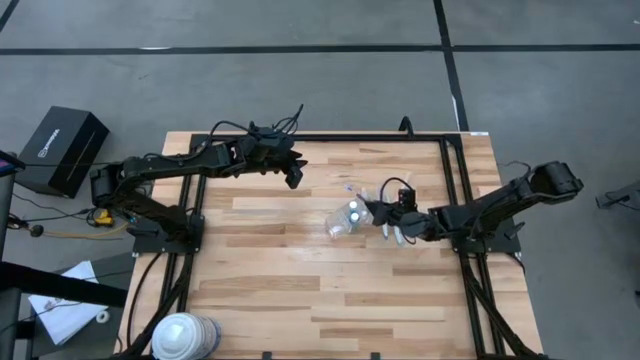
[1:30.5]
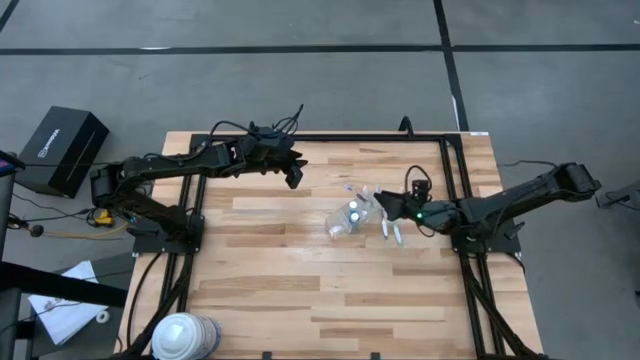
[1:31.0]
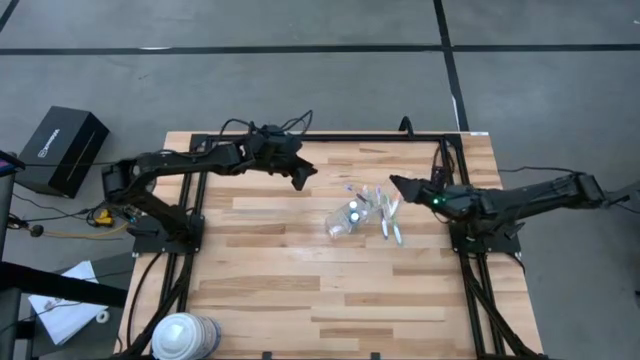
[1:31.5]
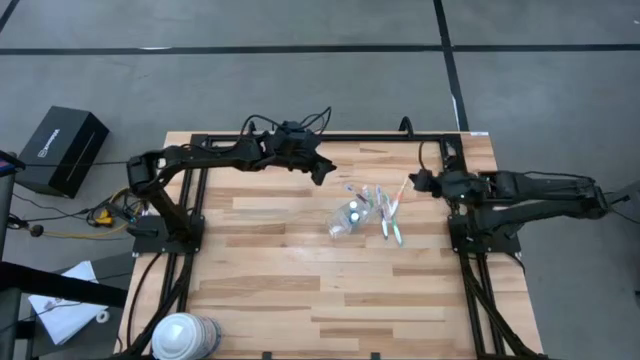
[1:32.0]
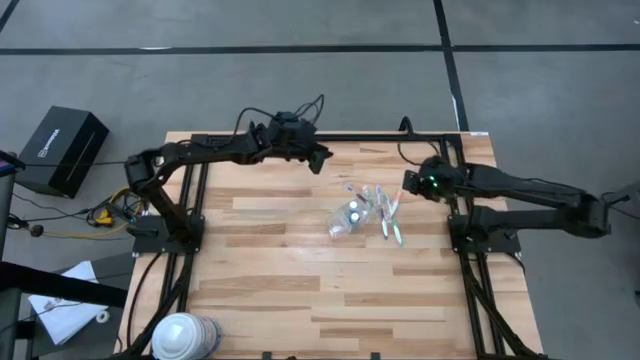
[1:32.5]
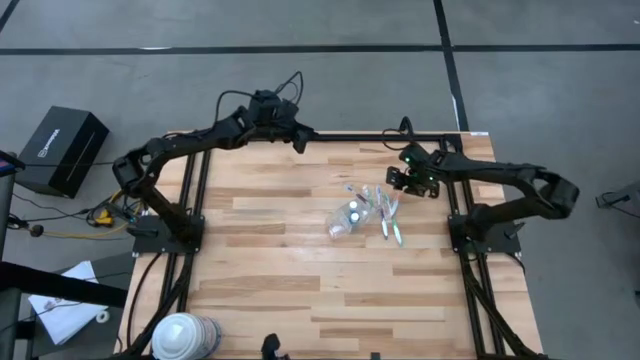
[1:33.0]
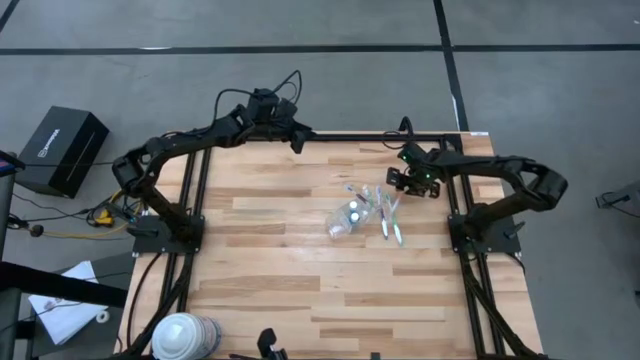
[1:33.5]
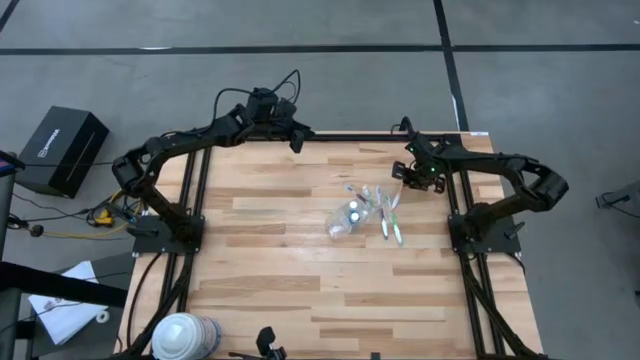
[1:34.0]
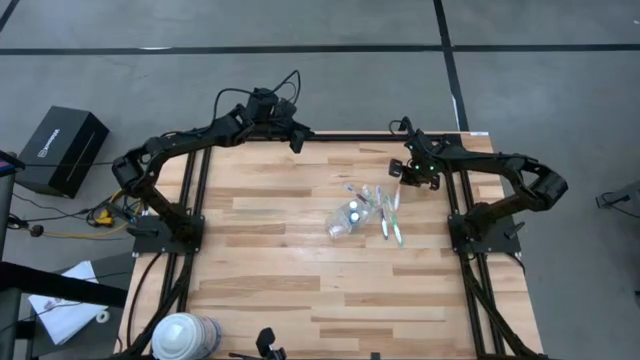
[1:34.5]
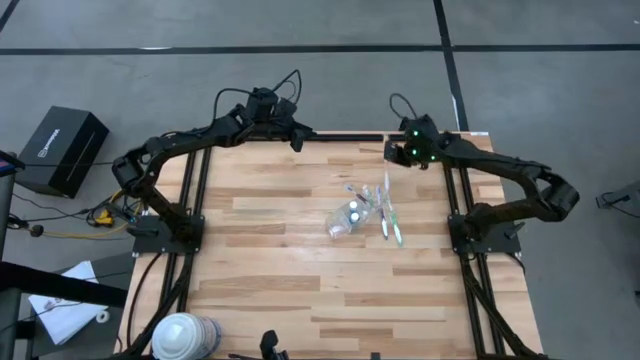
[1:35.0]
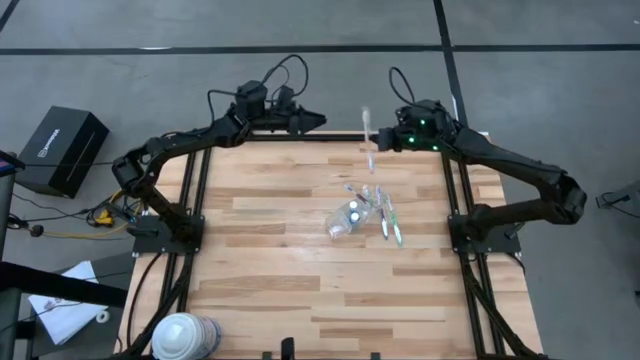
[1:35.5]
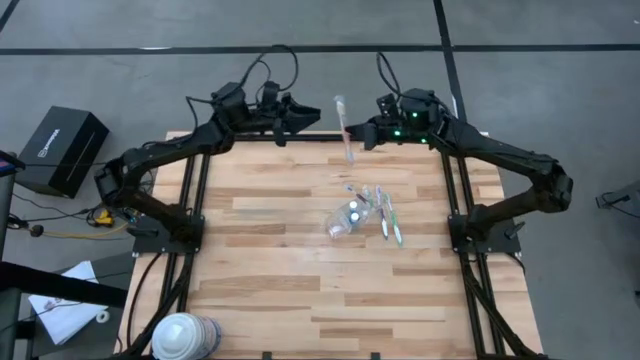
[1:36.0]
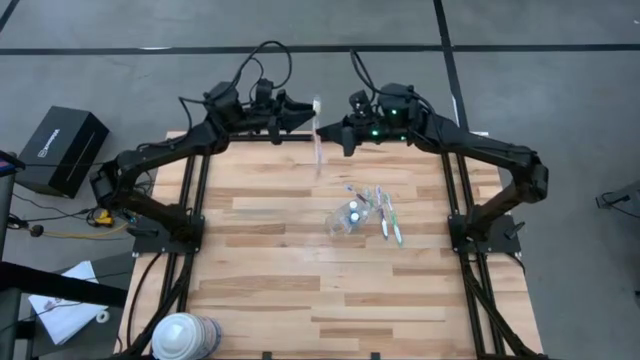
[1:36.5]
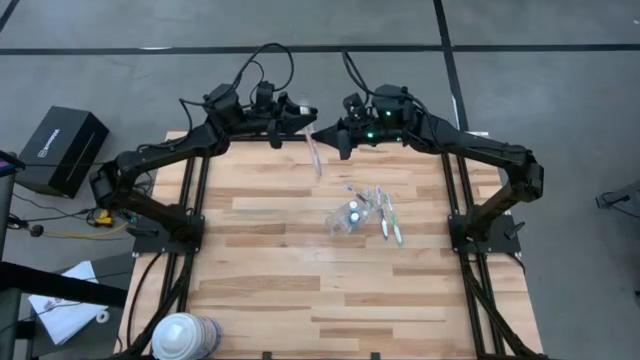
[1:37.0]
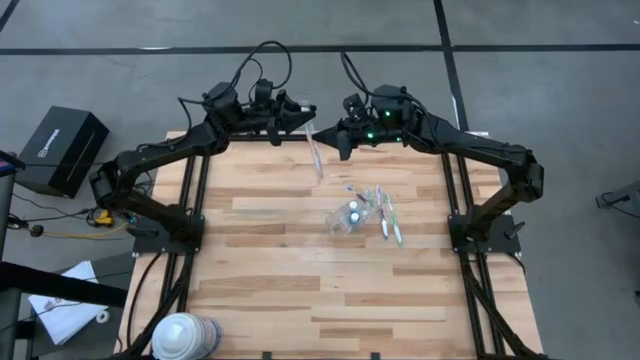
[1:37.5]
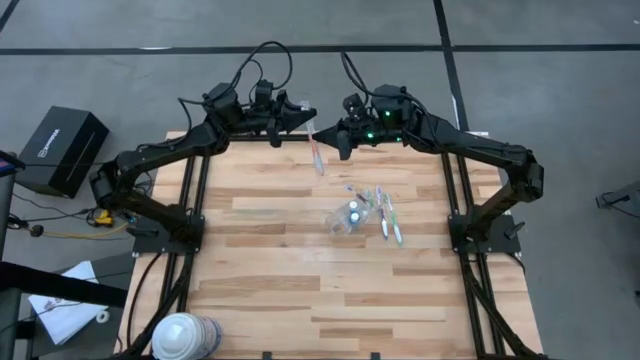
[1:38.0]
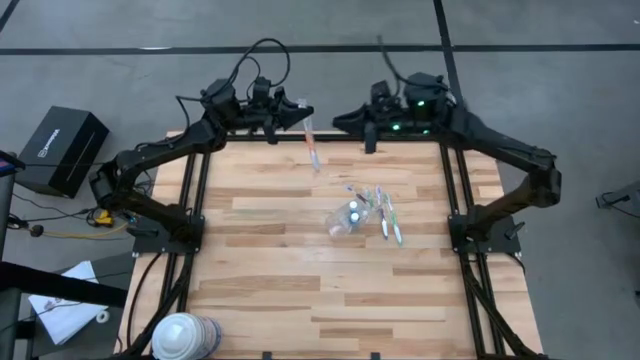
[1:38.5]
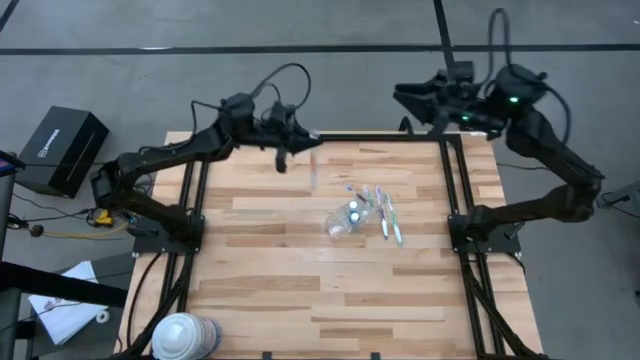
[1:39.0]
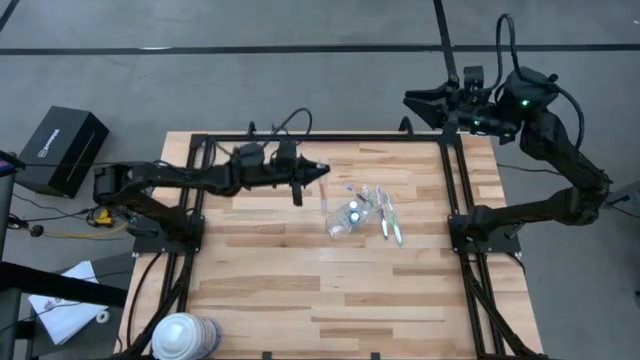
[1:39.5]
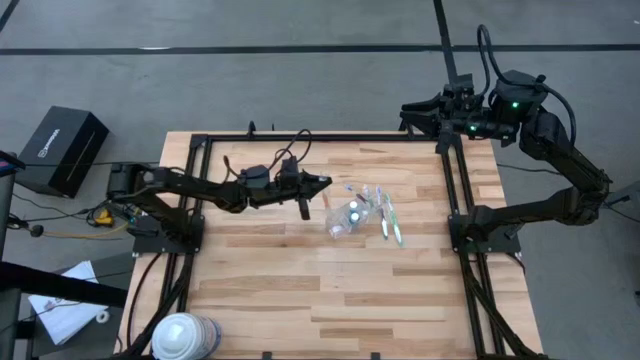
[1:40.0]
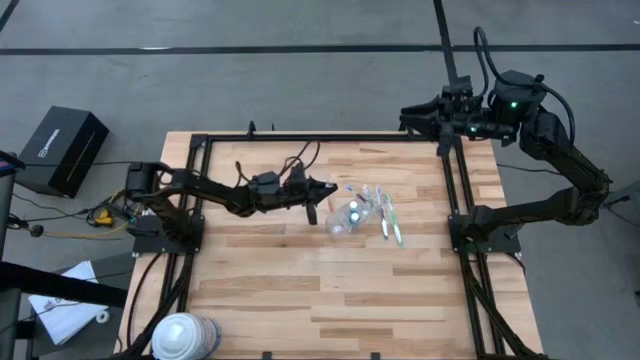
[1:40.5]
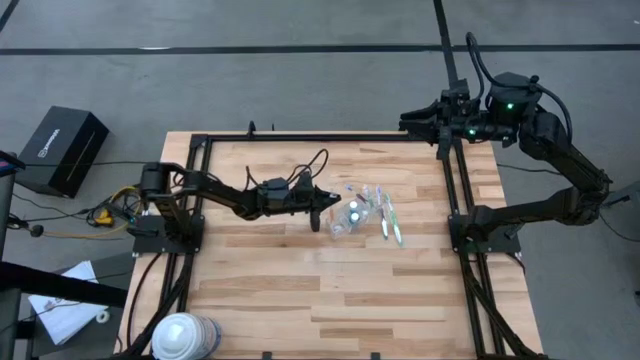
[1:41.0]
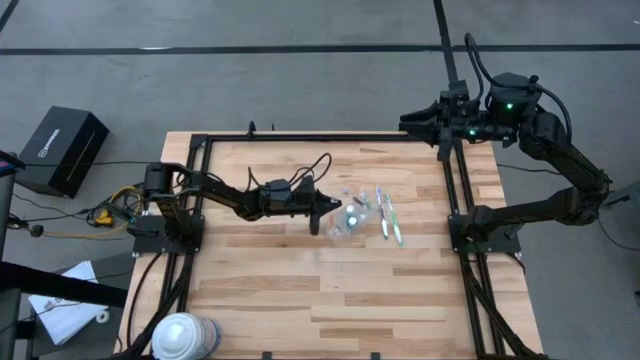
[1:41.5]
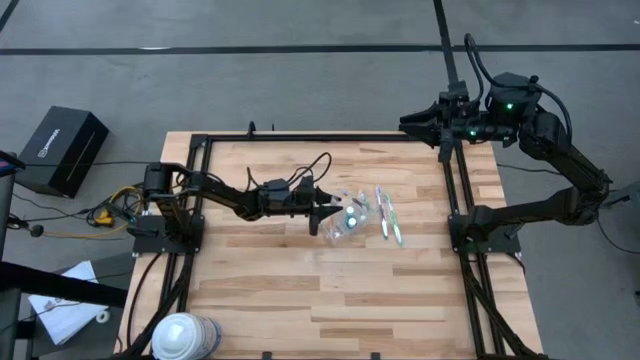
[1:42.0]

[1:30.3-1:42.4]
Task: Pick & Place toothbrushing station
Put the orange toothbrush into the transparent organizer

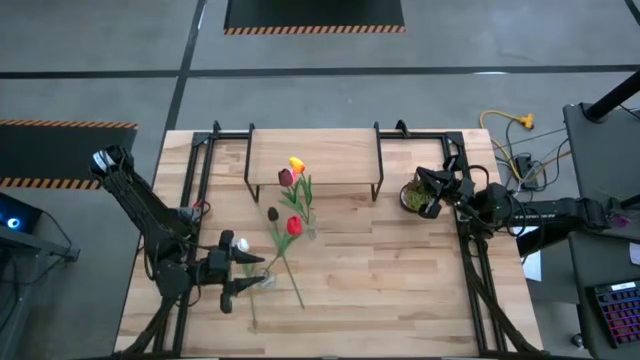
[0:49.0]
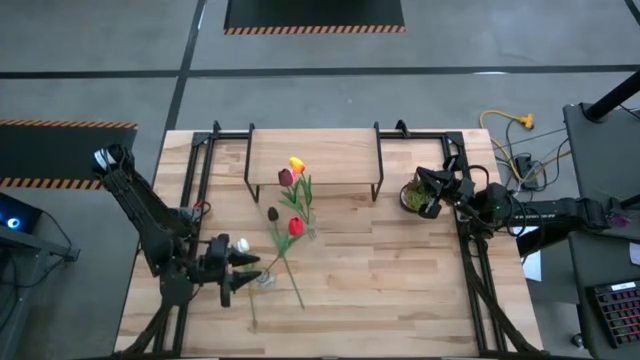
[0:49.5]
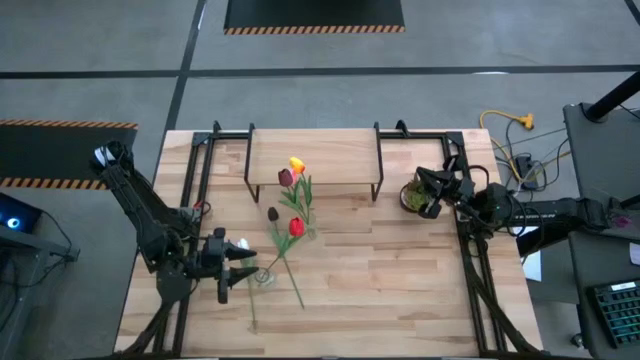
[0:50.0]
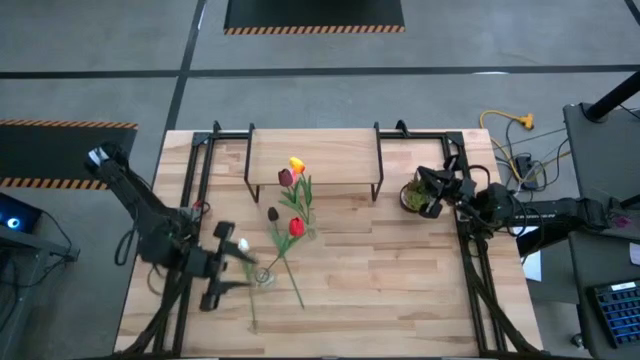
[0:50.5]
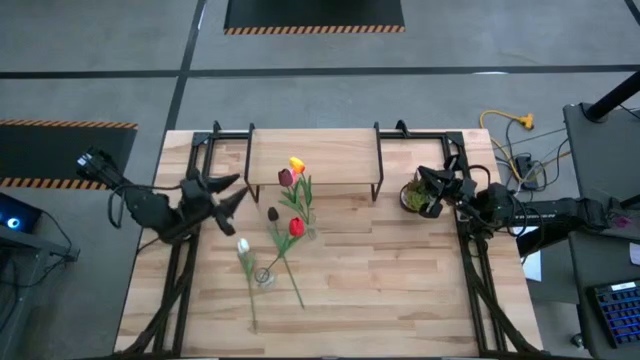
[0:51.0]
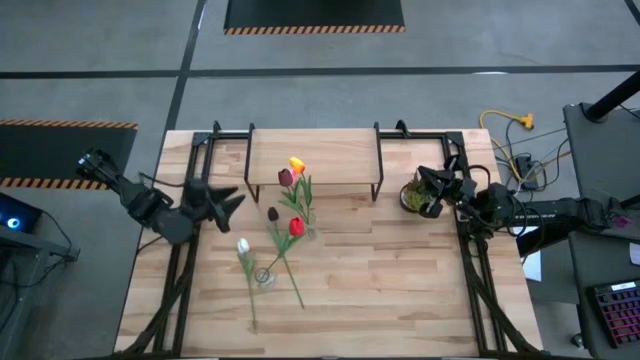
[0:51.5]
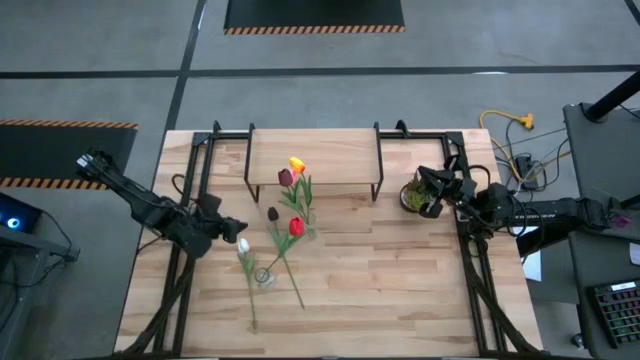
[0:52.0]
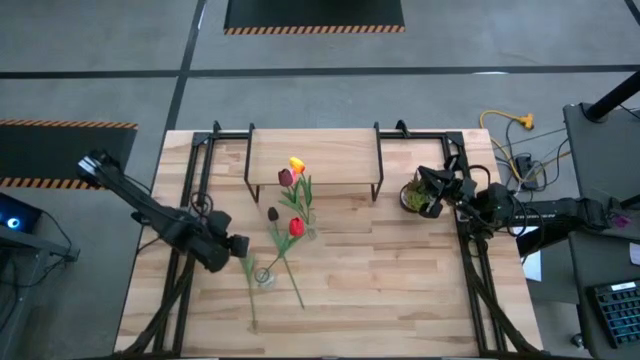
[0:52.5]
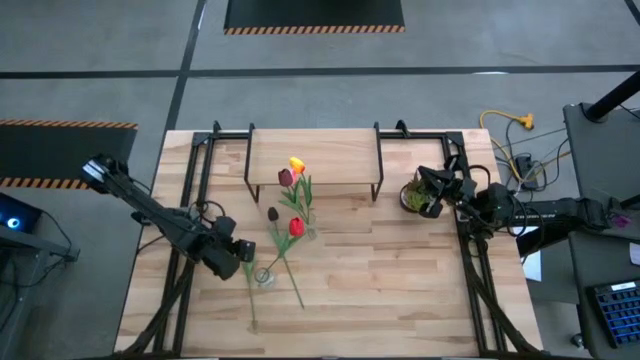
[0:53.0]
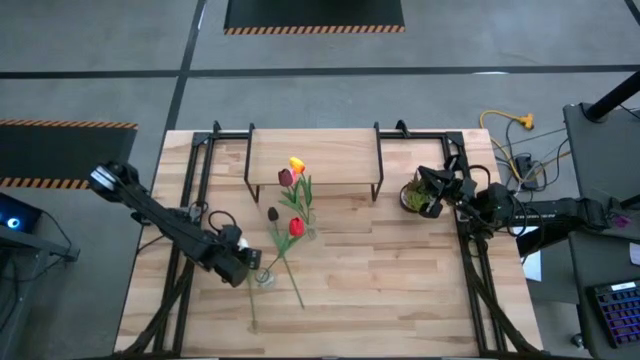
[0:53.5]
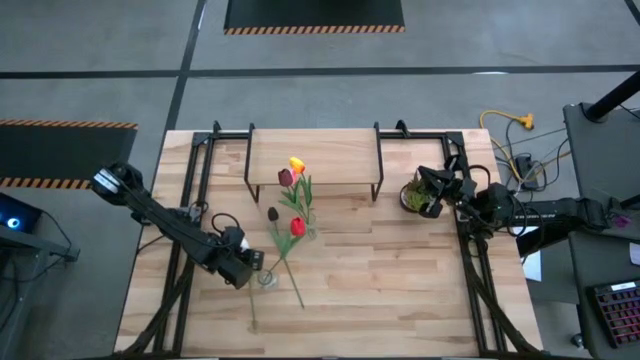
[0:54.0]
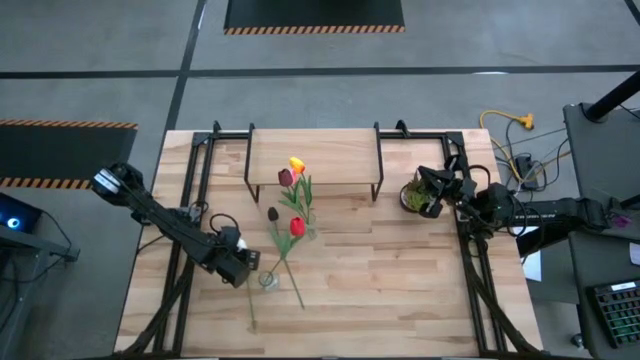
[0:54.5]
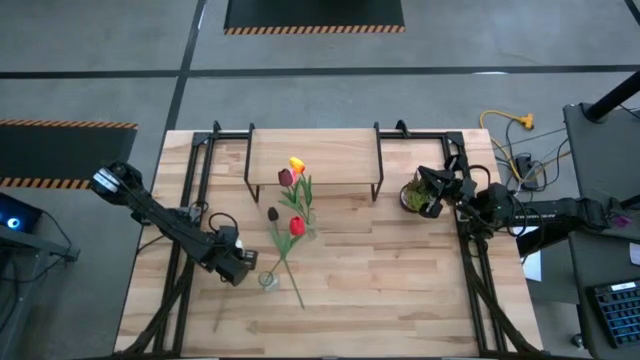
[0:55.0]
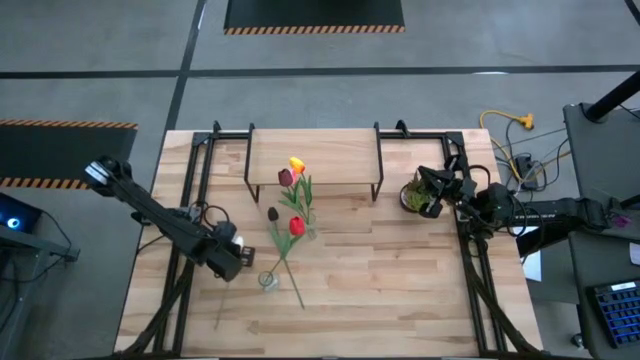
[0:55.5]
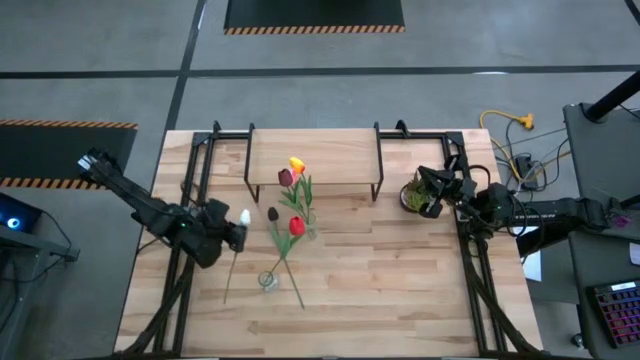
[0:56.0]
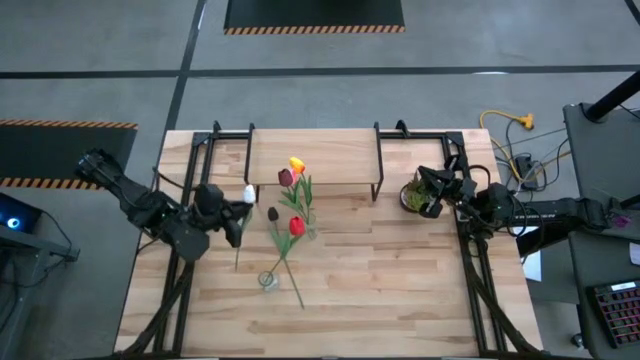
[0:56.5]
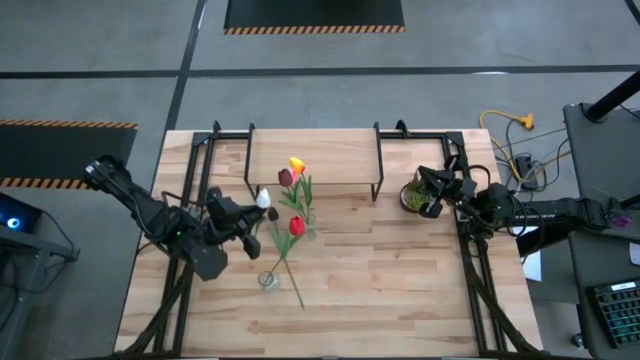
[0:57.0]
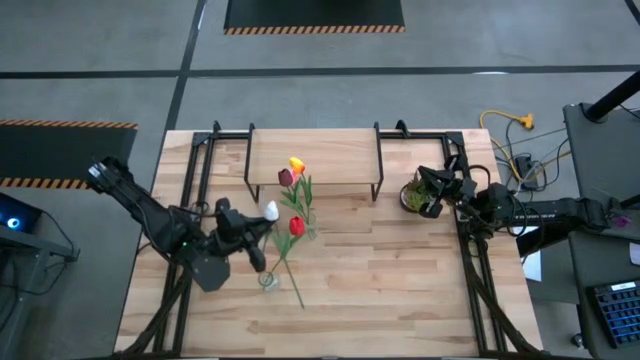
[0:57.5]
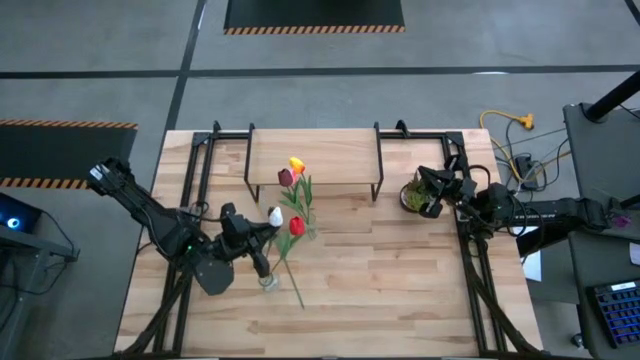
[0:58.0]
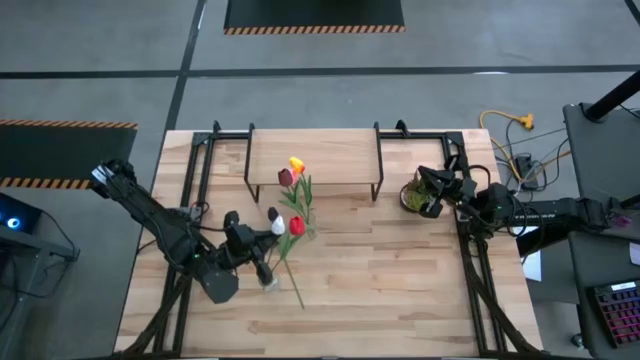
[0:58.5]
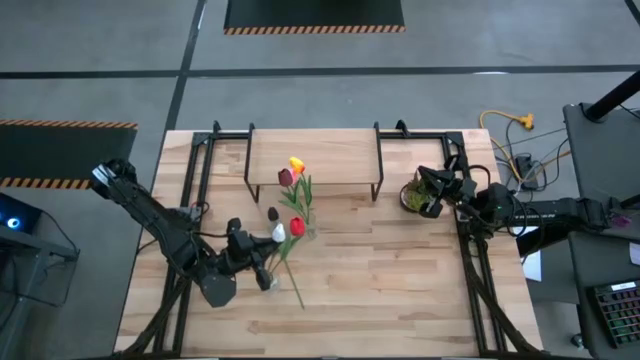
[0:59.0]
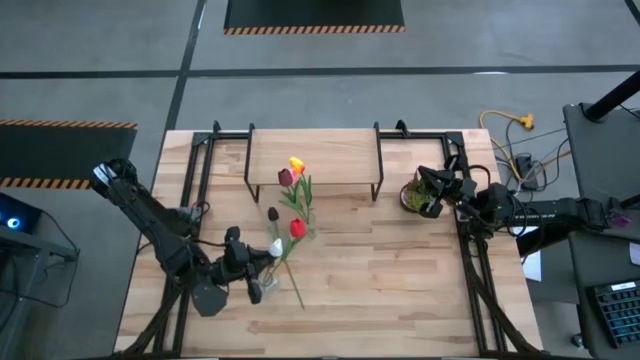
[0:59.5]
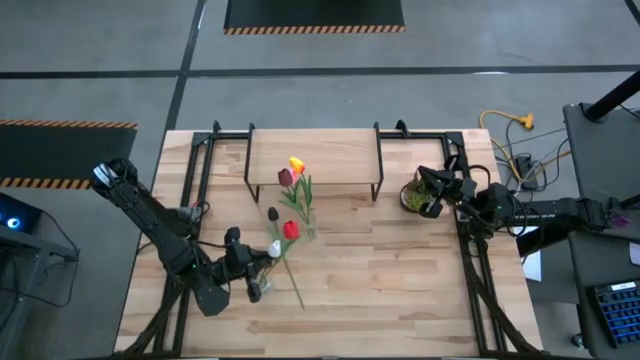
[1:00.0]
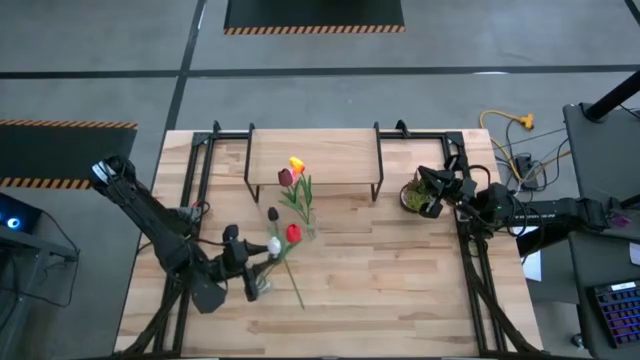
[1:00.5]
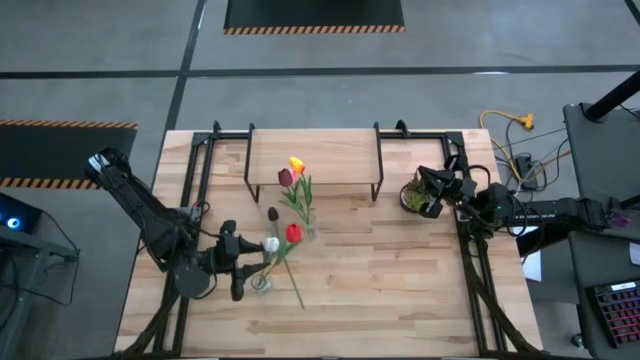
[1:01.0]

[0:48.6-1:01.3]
Task: Pick and place flowers into a vace then onto a shelf
Put the white flower into the bottom transparent vase
